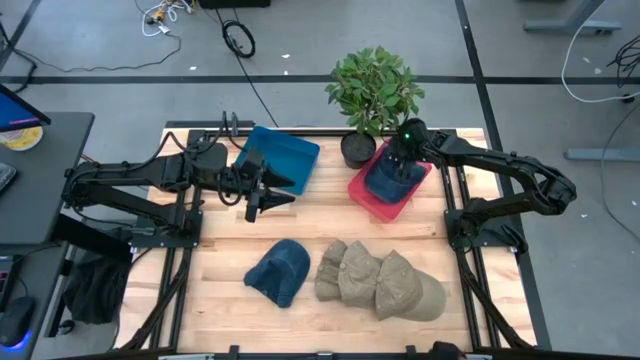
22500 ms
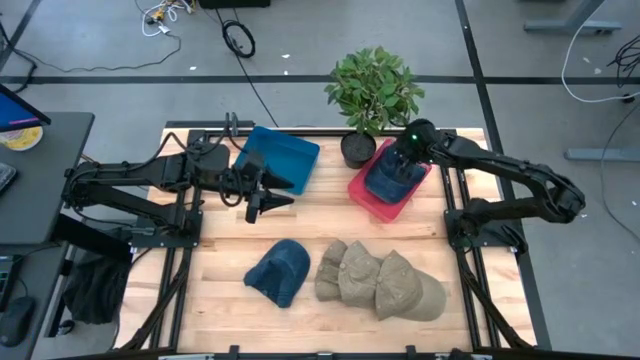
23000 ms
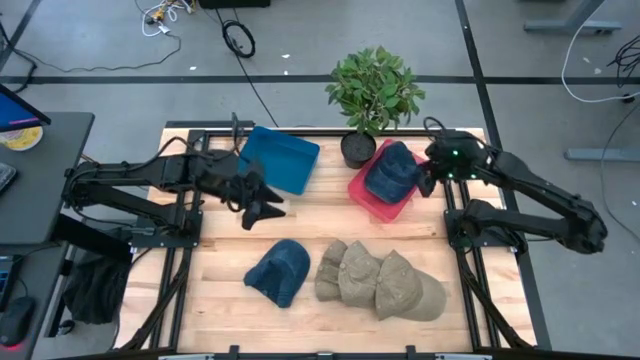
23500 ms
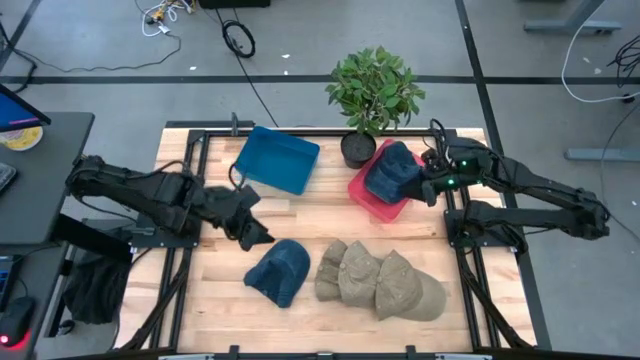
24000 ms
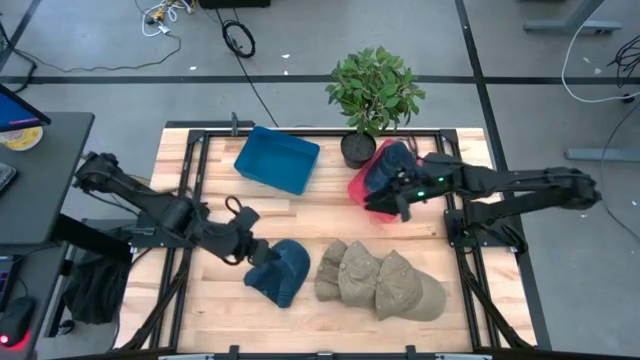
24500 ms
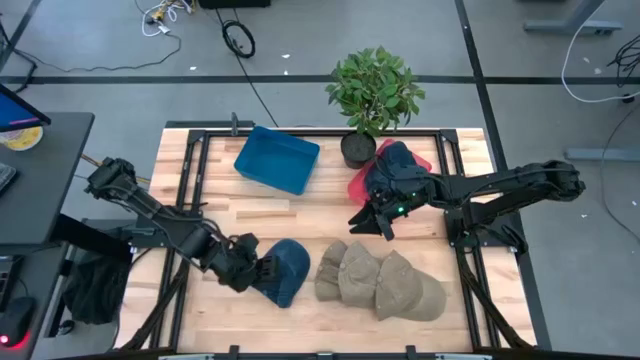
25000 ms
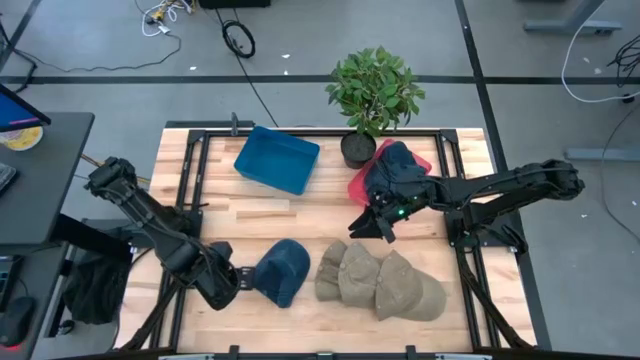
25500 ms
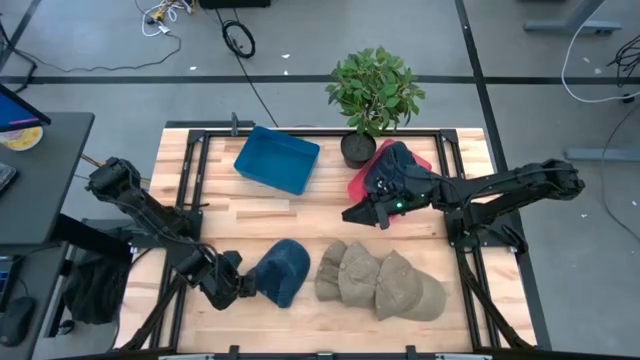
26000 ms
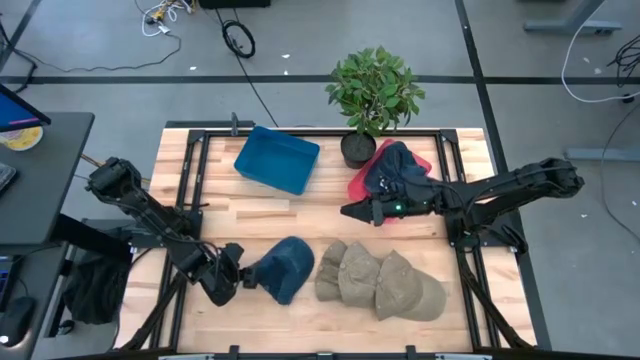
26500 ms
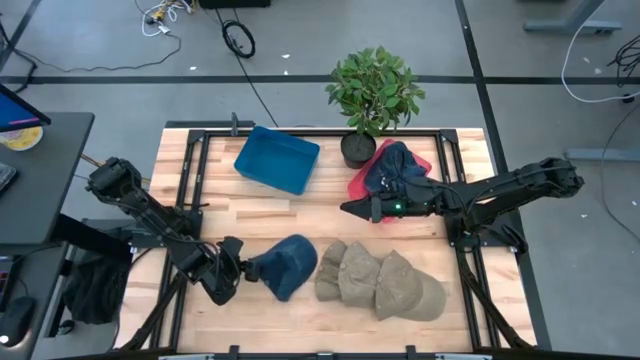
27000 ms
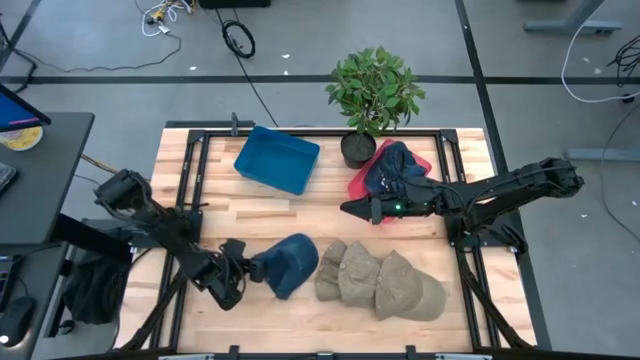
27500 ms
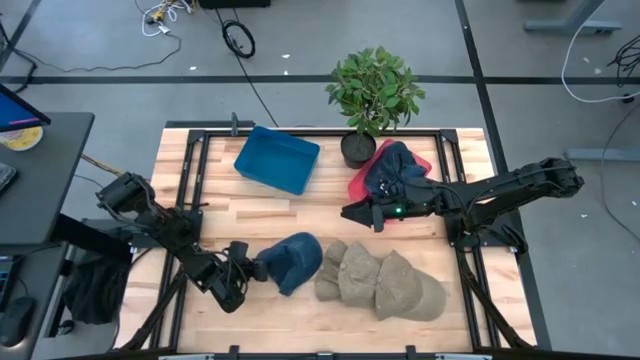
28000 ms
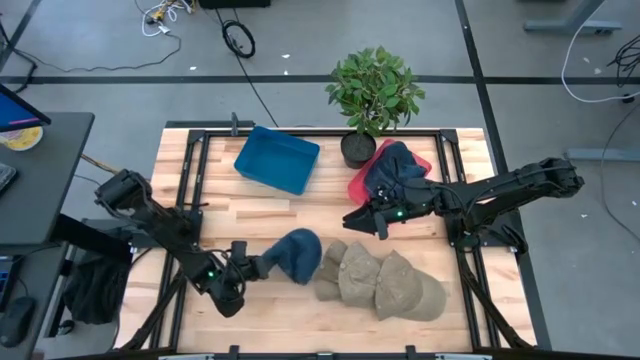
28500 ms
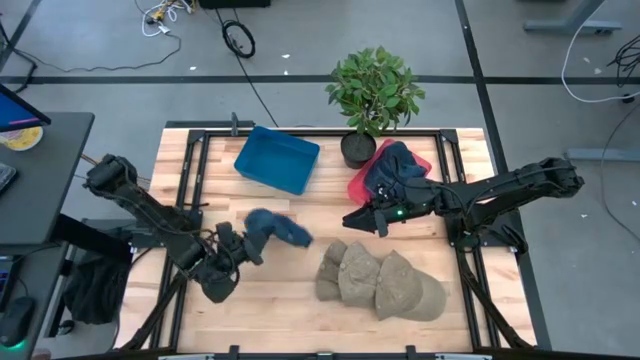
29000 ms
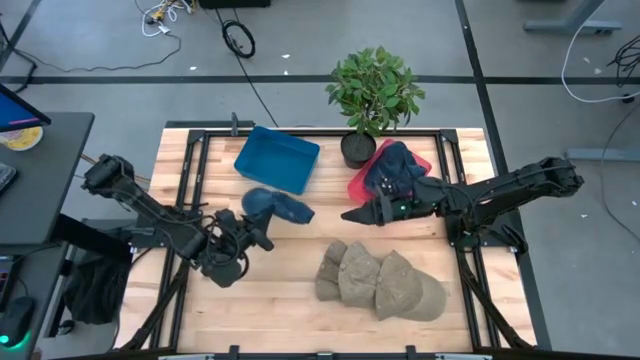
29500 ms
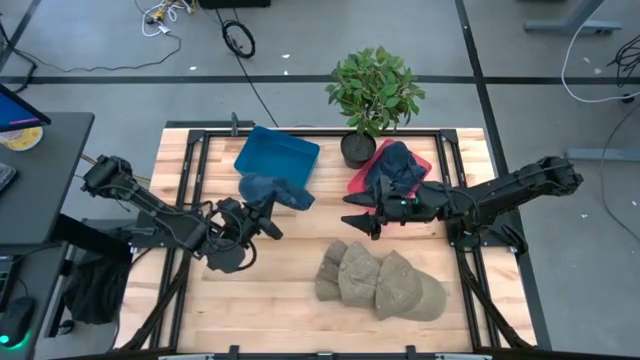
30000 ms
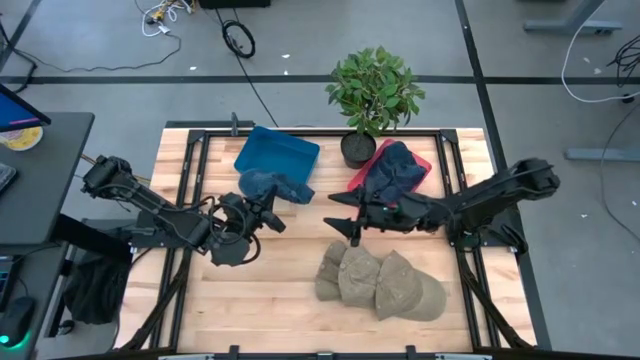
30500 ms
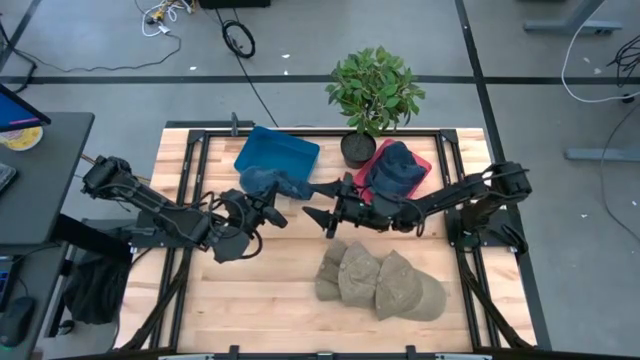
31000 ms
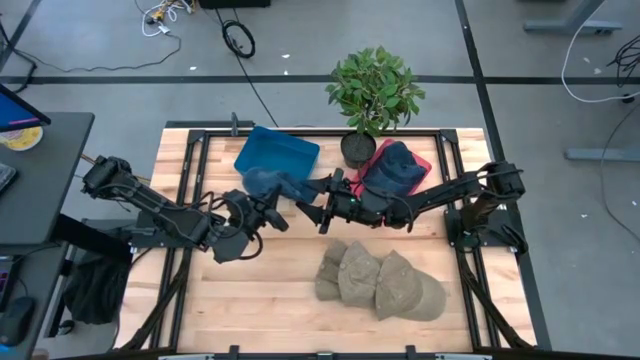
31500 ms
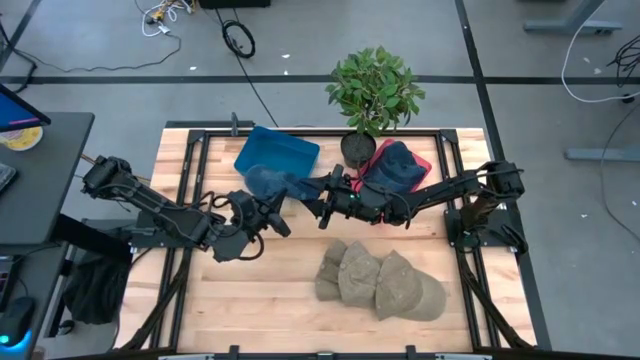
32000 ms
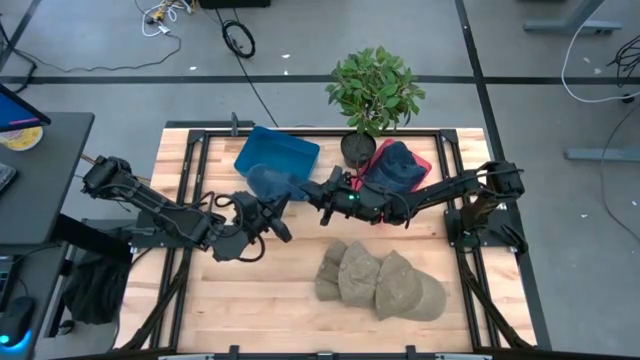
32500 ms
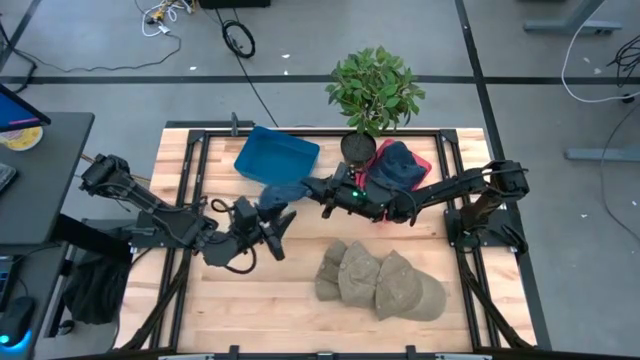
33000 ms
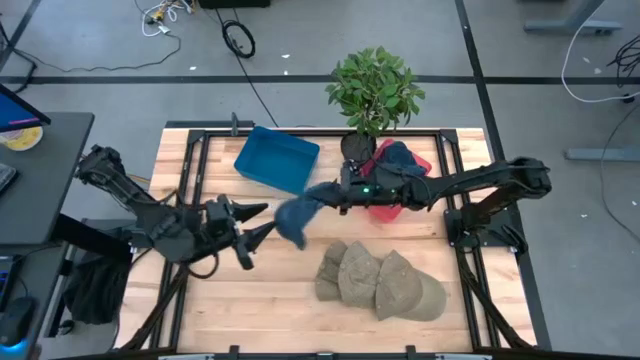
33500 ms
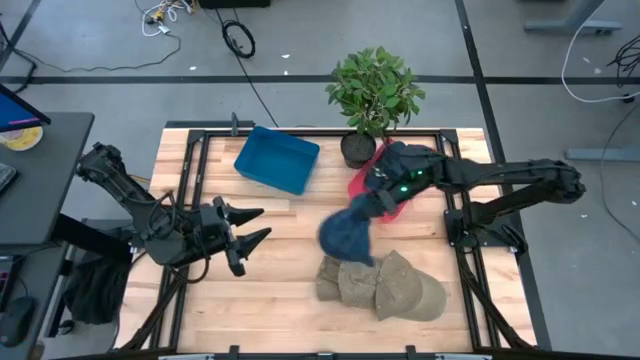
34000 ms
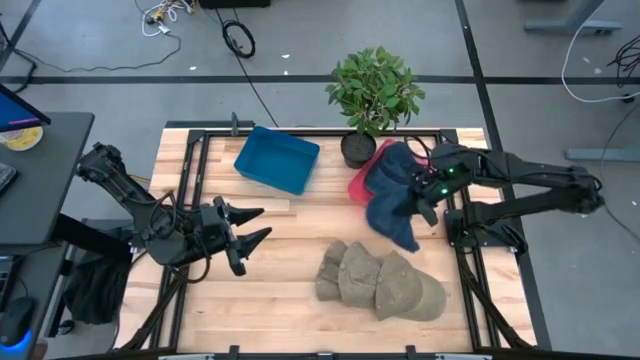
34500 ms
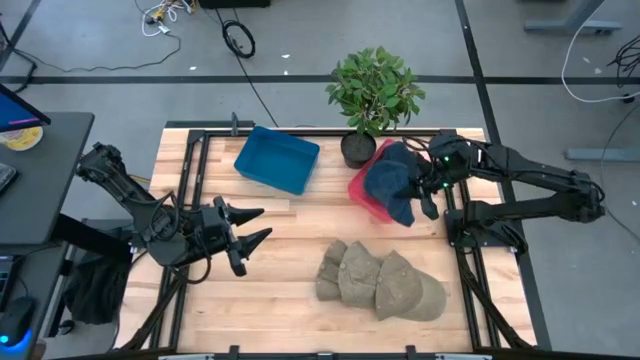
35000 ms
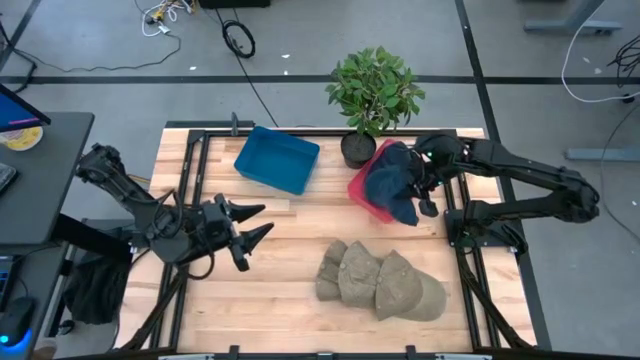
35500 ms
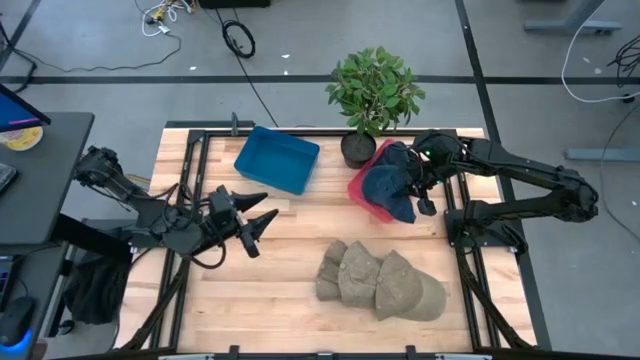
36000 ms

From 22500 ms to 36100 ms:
Task: Pick & Place hat
Put the blue cap into the red bin

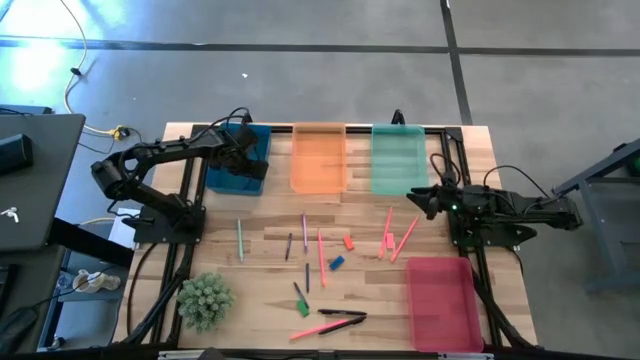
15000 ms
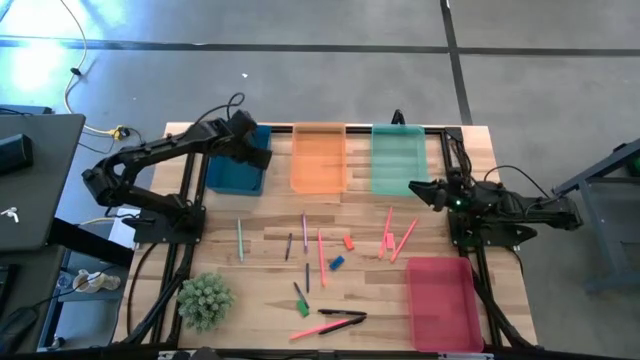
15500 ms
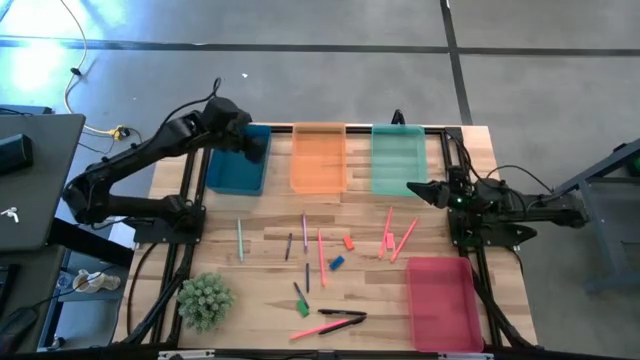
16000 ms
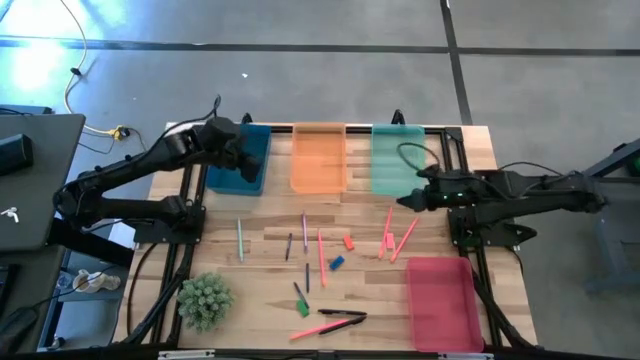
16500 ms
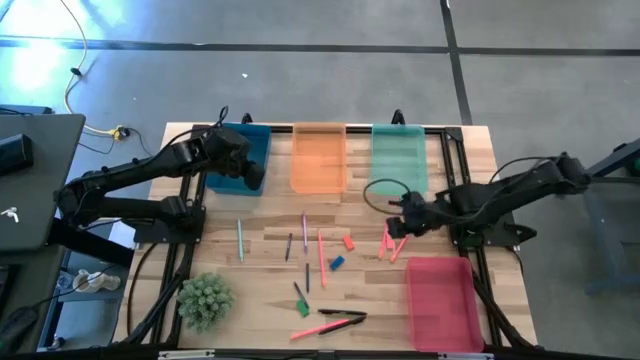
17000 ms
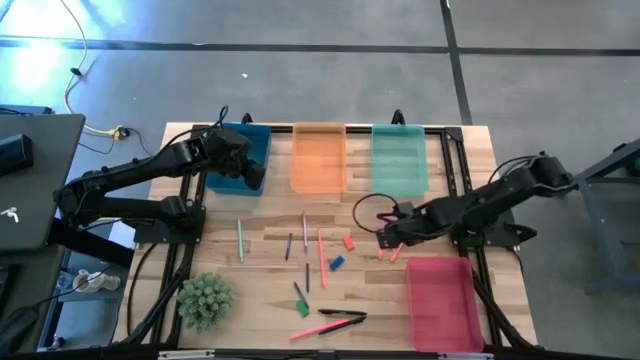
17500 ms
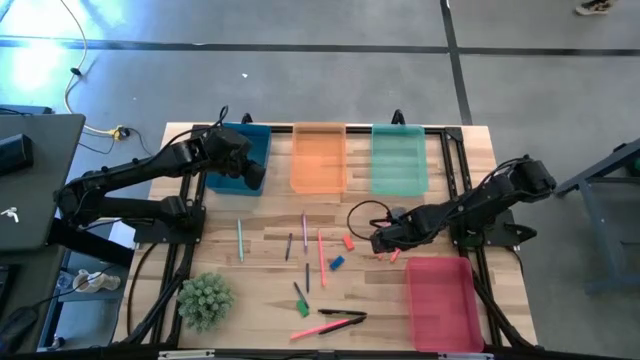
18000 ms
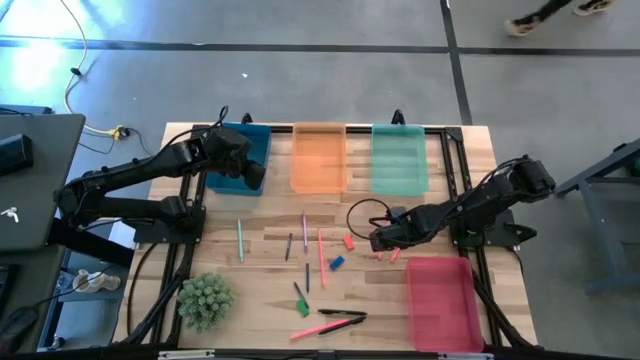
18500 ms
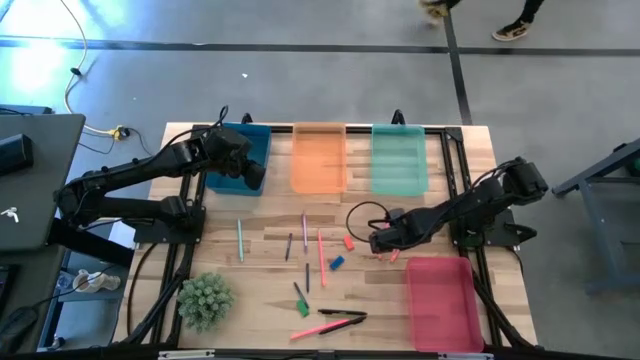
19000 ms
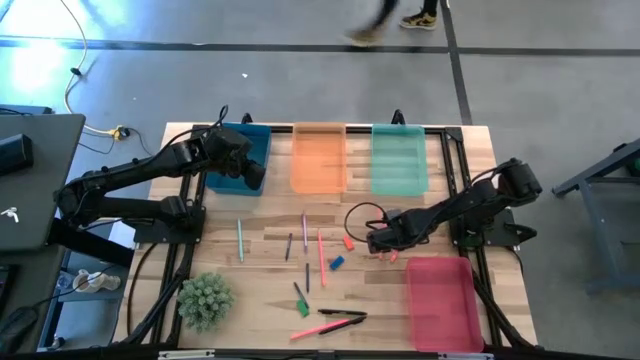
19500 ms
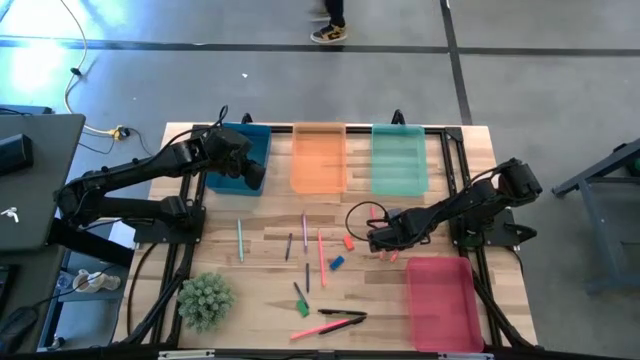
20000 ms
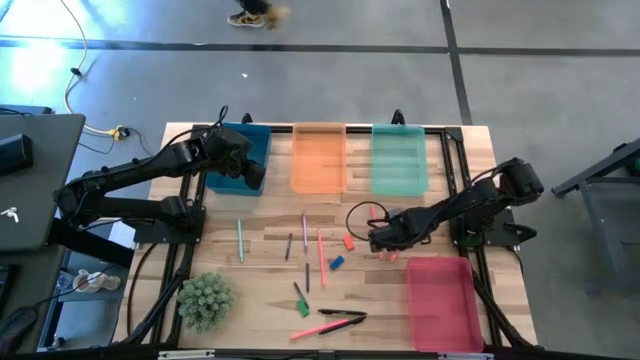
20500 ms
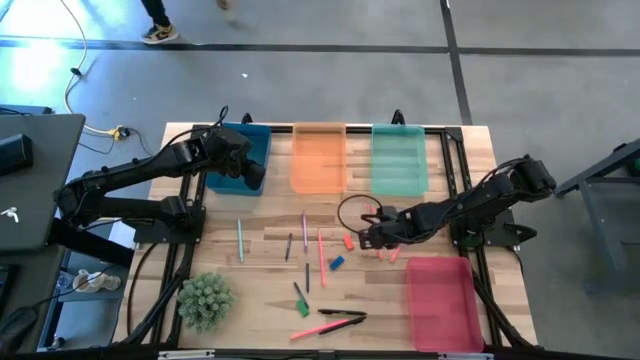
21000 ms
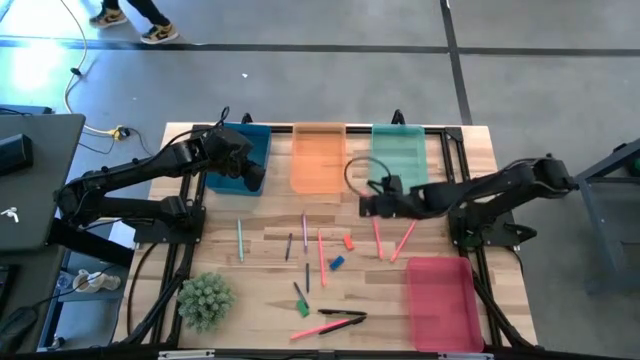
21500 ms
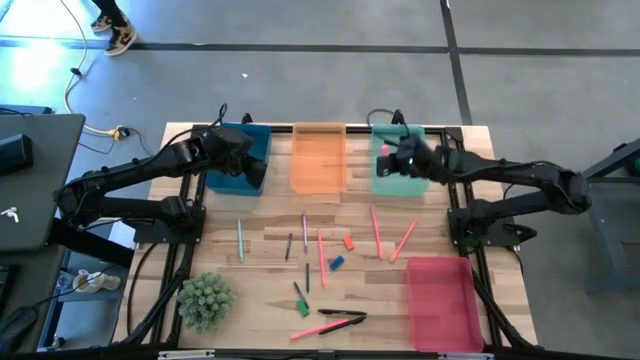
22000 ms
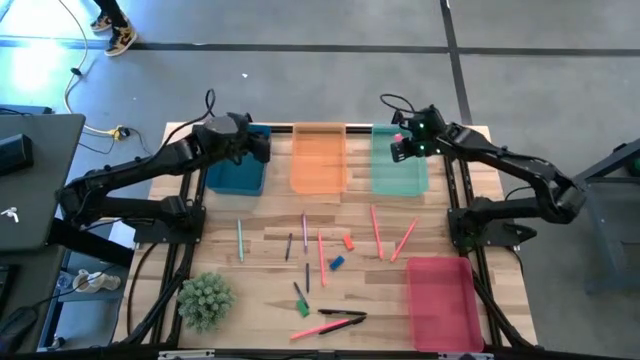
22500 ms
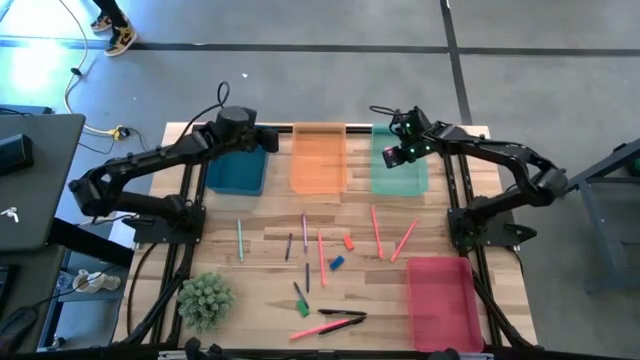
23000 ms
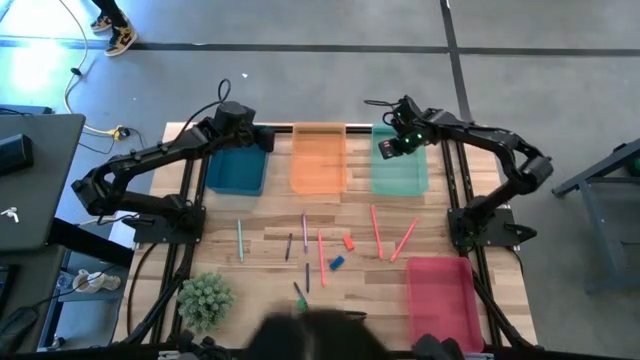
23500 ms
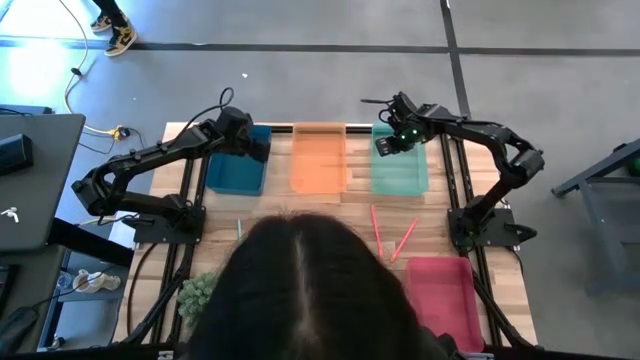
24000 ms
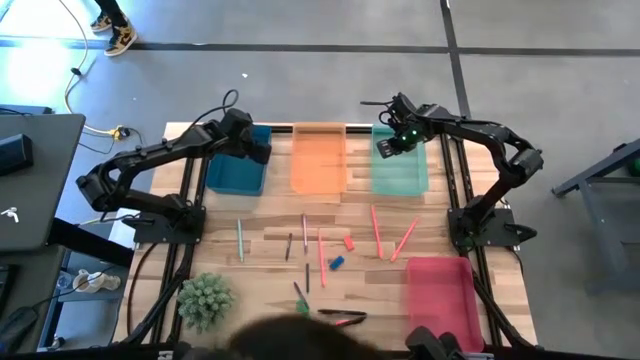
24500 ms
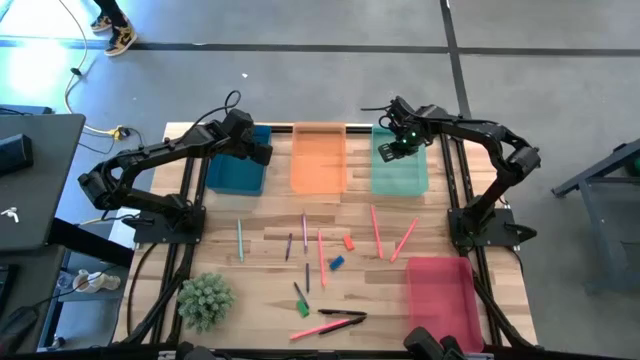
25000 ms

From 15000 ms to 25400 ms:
Task: Sort crayons/erasers/pens/pencils in bins
Put the pink eraser into the green bin
